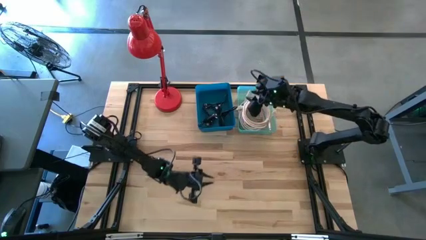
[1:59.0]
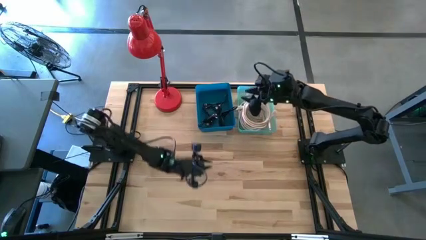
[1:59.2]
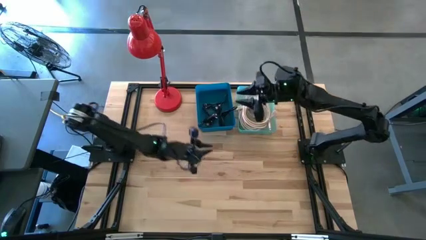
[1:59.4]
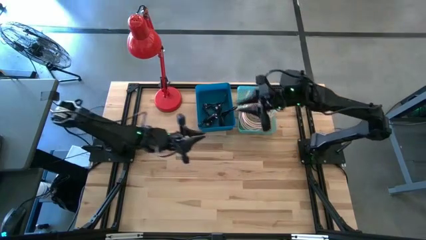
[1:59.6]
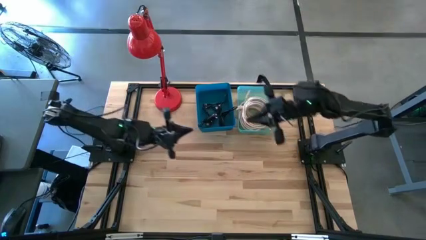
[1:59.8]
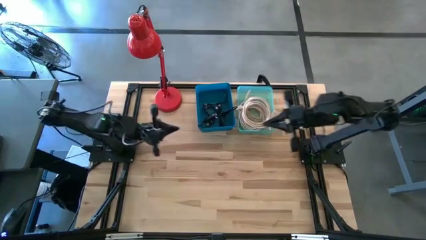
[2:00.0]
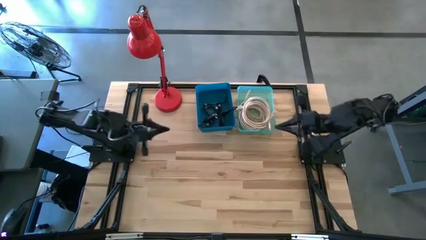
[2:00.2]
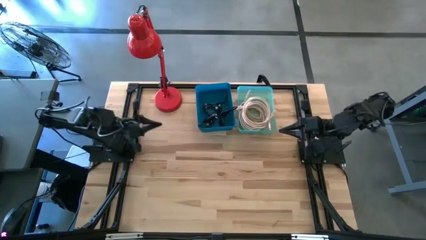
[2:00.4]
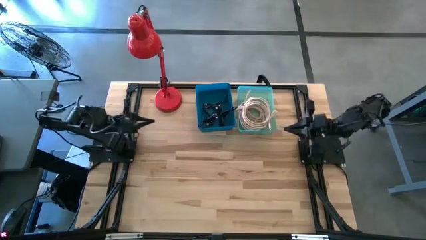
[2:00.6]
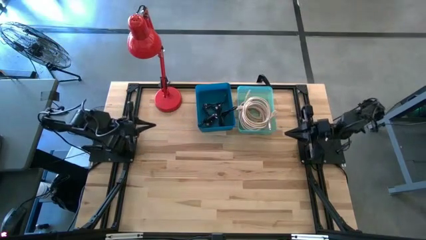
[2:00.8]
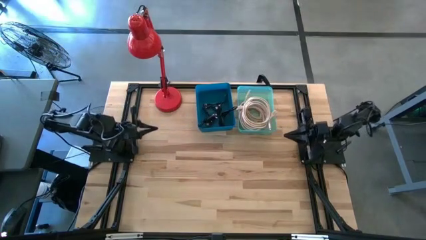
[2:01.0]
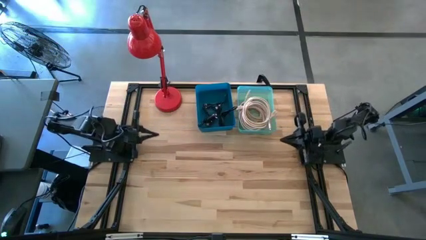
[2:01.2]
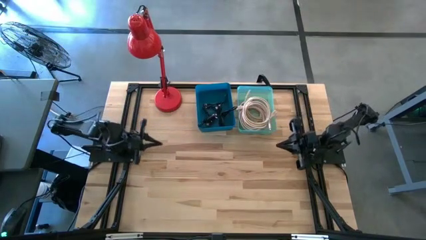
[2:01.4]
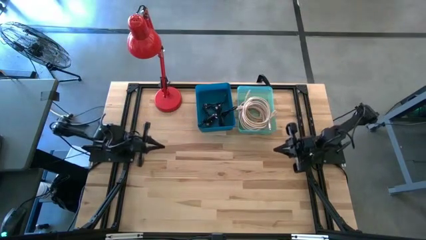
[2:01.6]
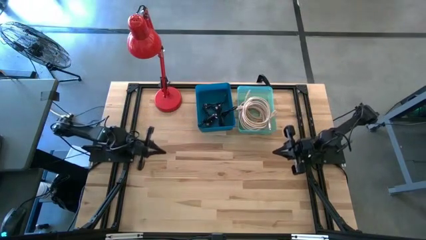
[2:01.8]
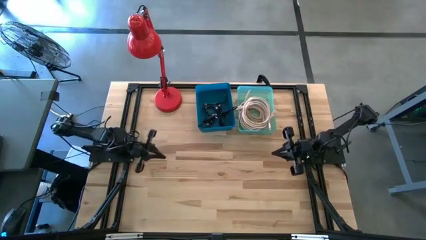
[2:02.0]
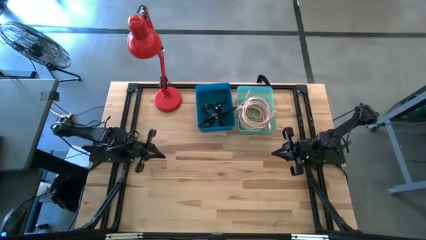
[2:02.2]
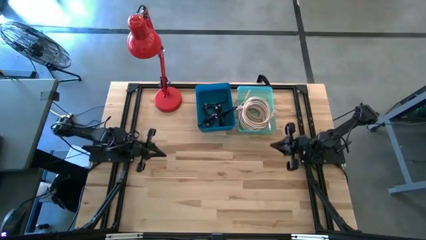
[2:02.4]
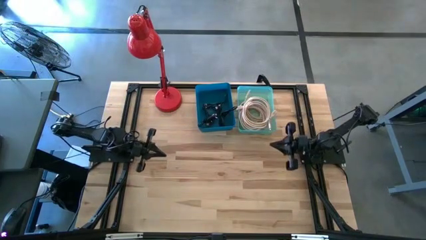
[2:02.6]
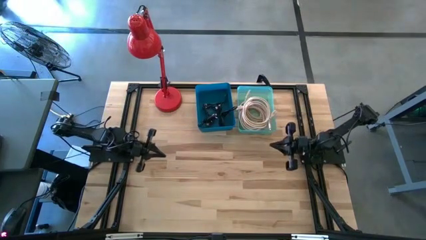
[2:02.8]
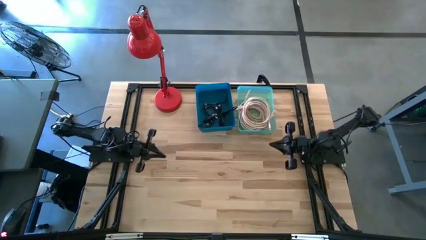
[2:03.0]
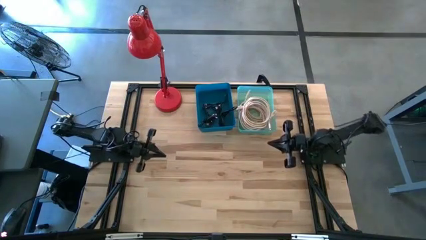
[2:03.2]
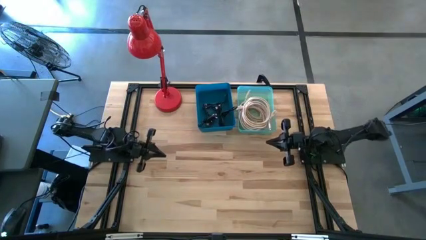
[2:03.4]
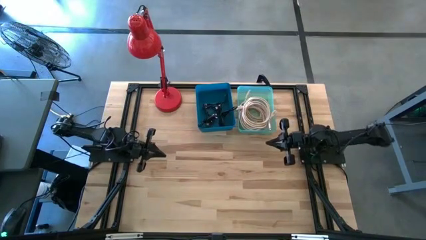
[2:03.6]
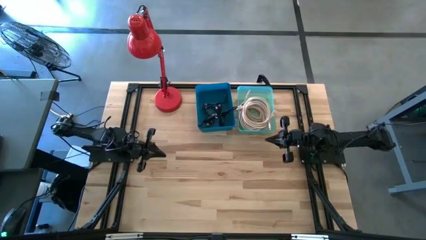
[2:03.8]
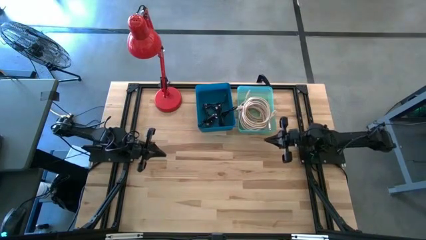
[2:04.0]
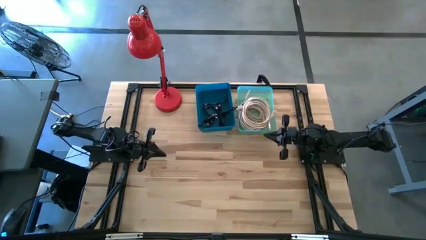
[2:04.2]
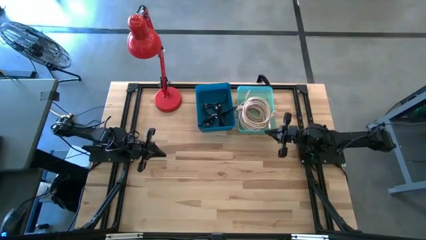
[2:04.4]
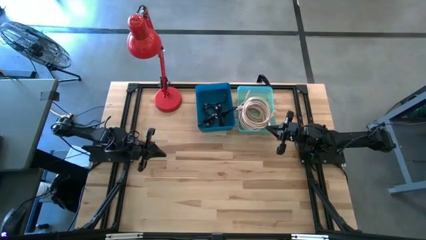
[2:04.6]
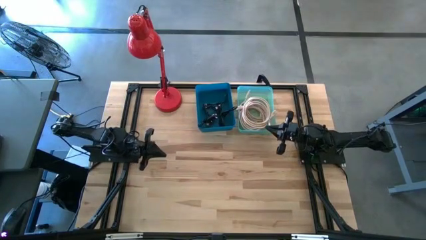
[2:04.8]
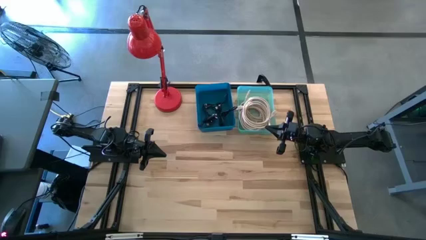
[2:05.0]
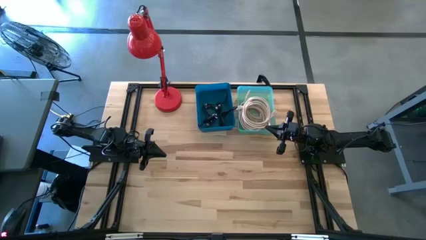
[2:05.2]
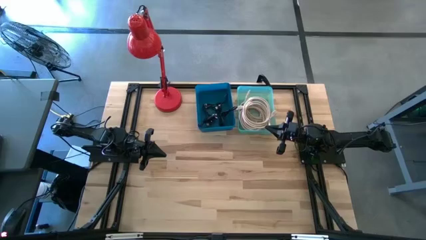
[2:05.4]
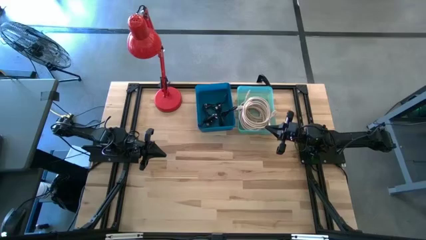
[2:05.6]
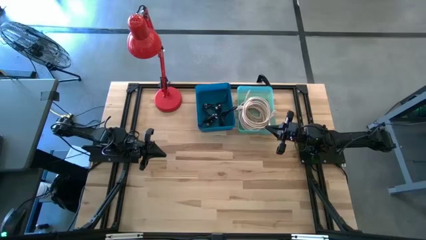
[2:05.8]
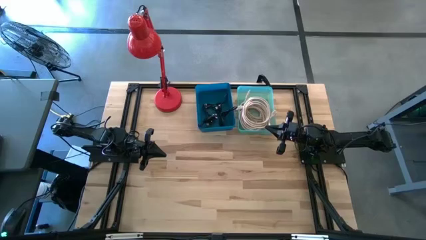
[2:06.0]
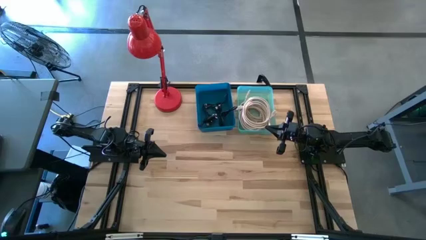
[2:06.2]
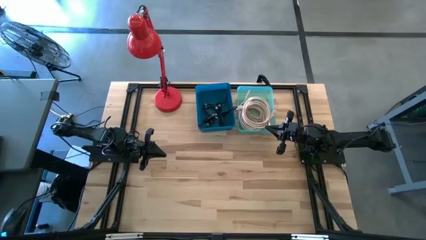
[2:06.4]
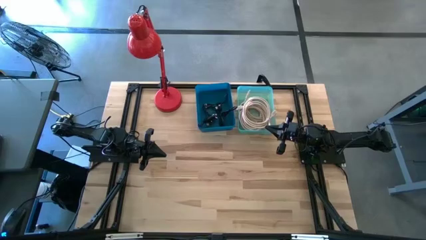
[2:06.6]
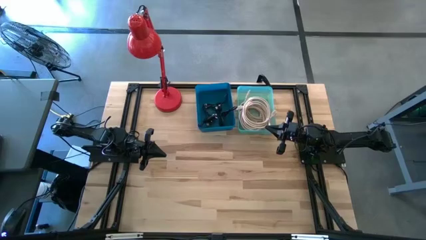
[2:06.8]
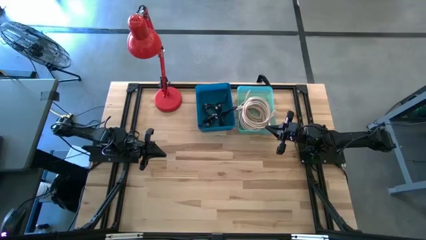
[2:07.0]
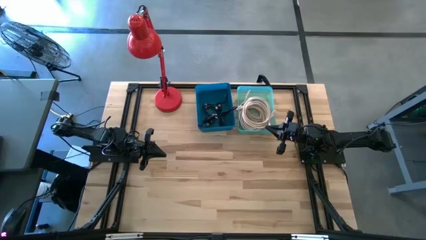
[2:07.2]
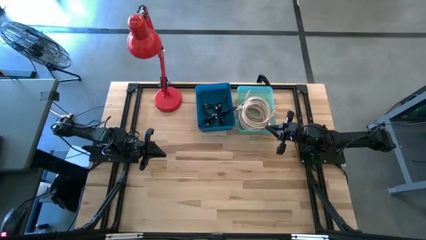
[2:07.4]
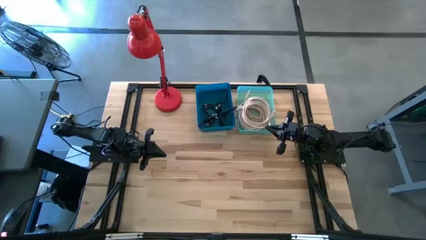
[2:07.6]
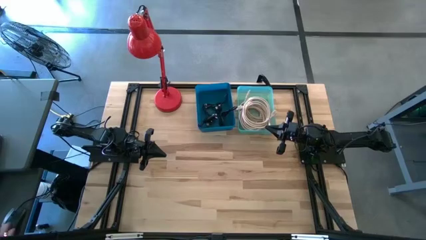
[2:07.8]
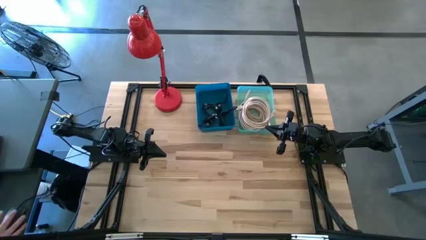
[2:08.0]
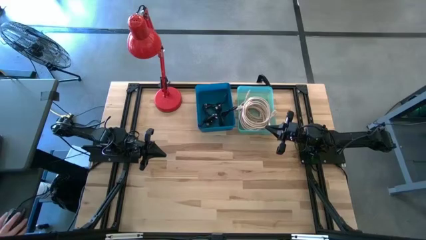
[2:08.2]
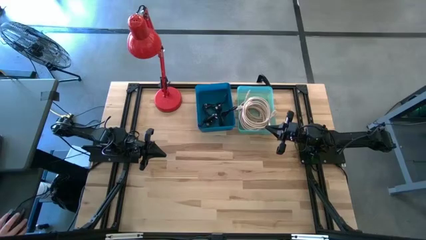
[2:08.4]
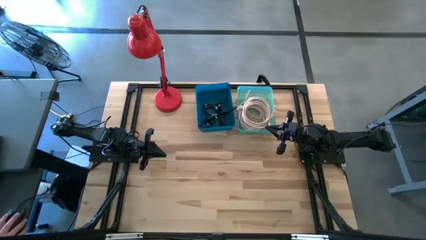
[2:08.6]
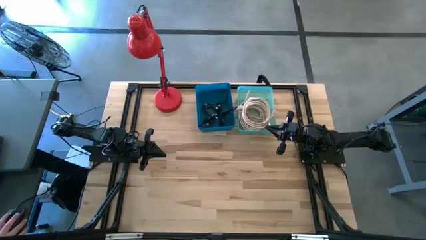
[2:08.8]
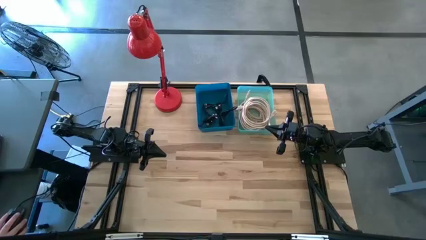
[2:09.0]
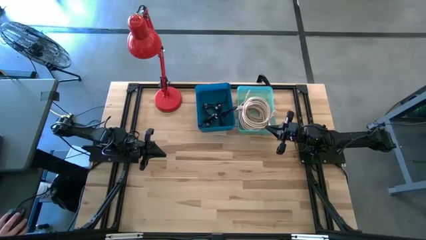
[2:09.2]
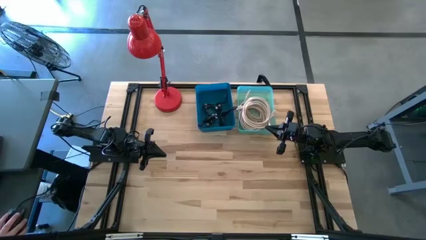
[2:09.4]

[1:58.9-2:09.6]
Task: Pick & Place USB Port
Return to Home Position
